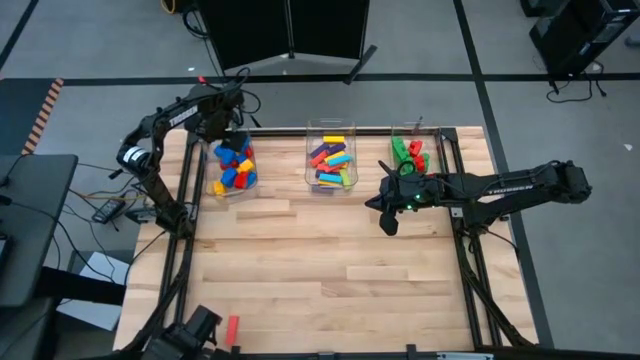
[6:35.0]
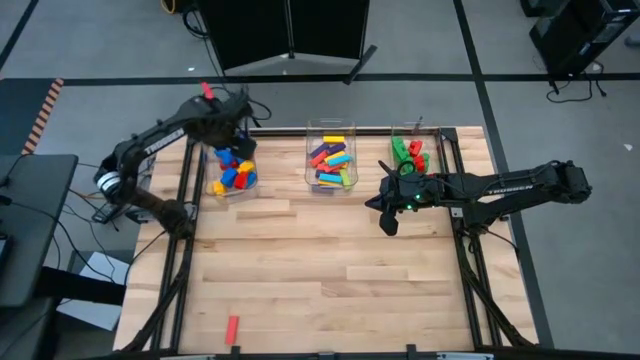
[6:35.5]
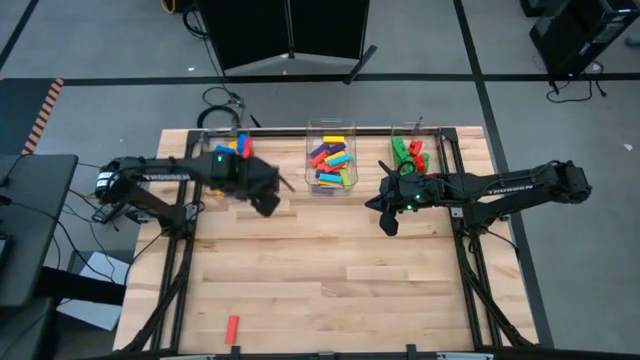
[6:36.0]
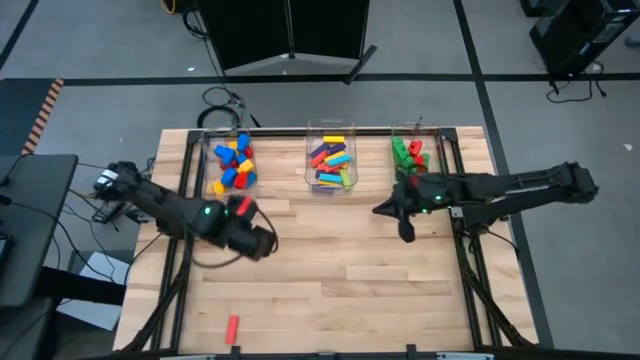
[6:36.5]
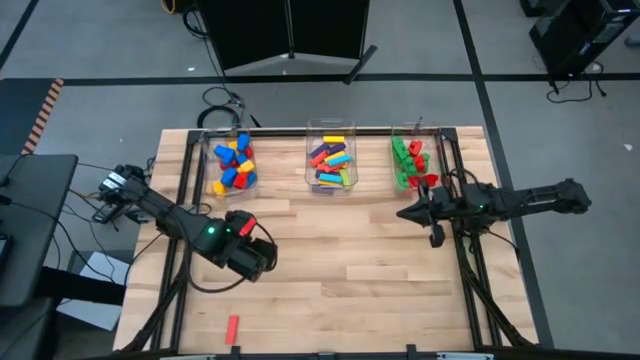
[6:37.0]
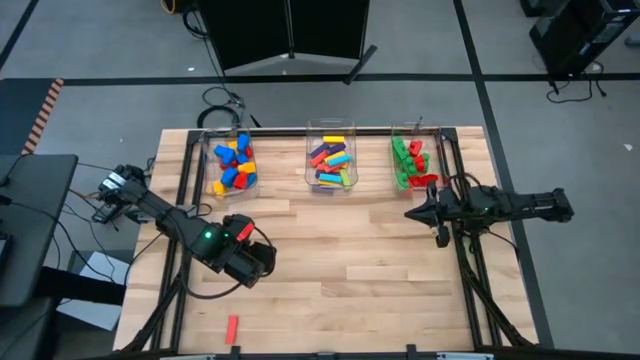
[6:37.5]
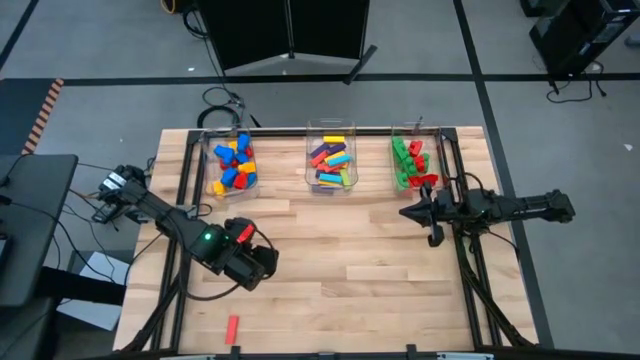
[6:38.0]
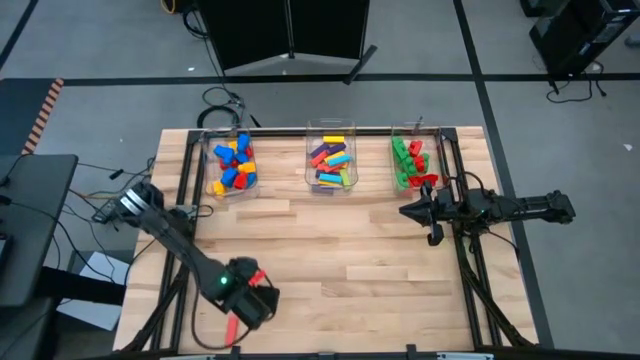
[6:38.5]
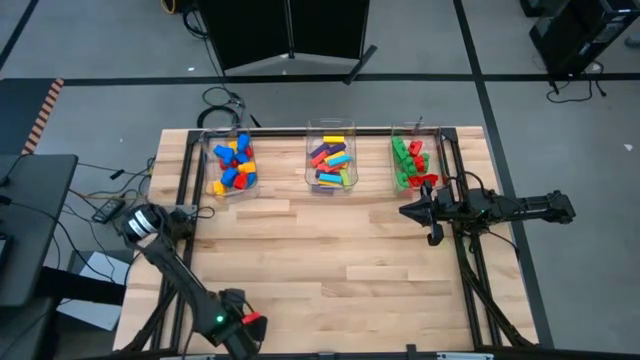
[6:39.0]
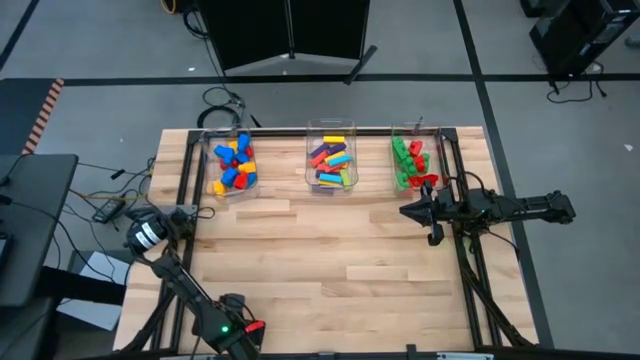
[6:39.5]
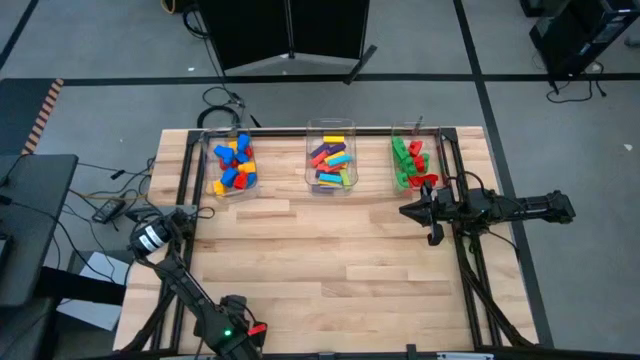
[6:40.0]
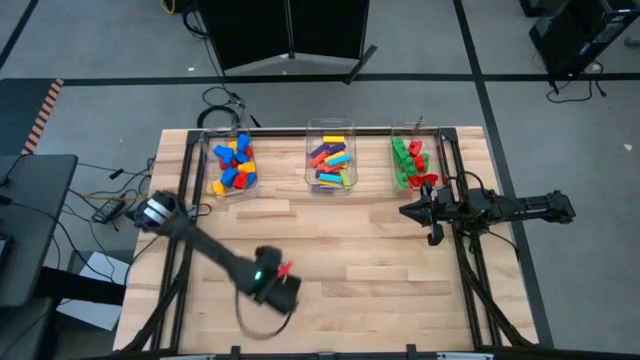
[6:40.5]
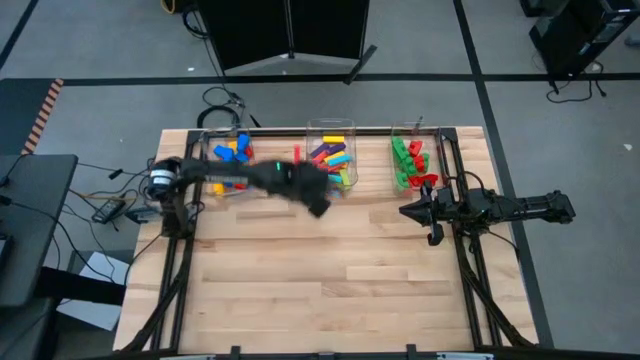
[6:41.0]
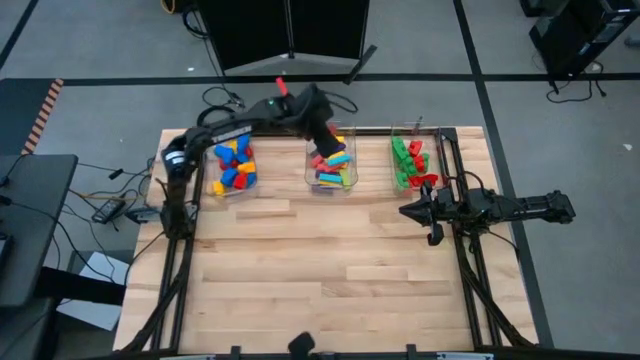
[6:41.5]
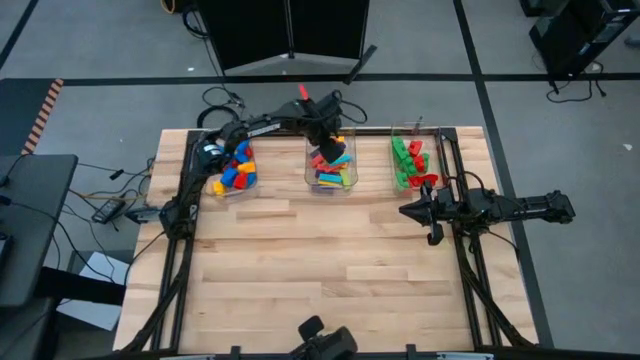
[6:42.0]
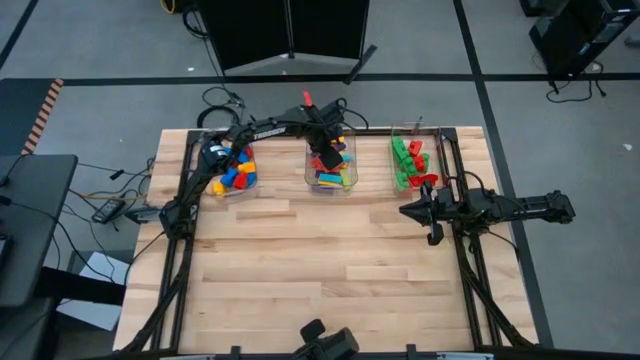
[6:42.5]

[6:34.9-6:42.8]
Task: Sort blocks by size
Put the red block into the middle transparent bin

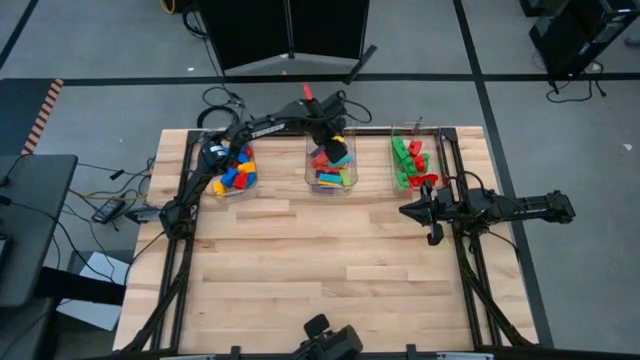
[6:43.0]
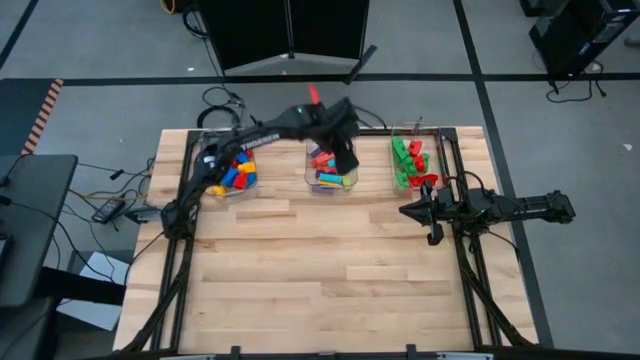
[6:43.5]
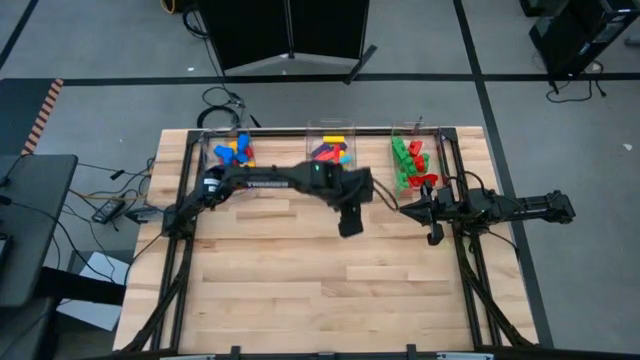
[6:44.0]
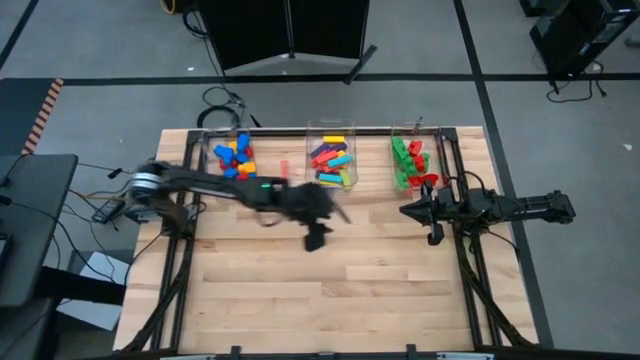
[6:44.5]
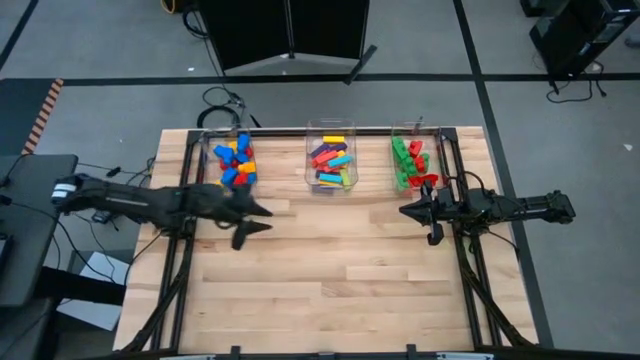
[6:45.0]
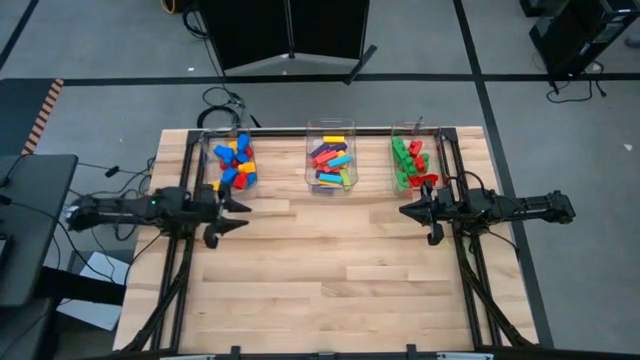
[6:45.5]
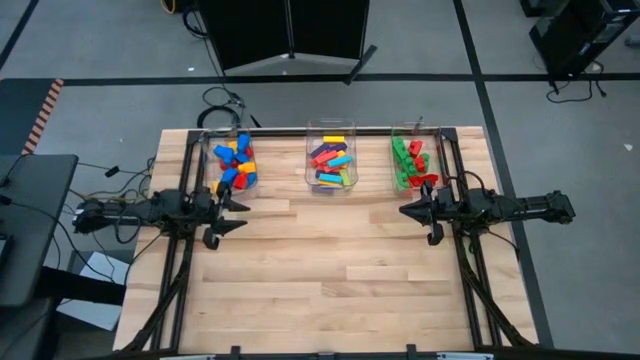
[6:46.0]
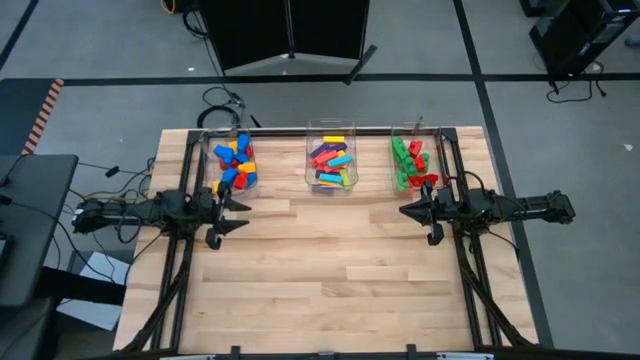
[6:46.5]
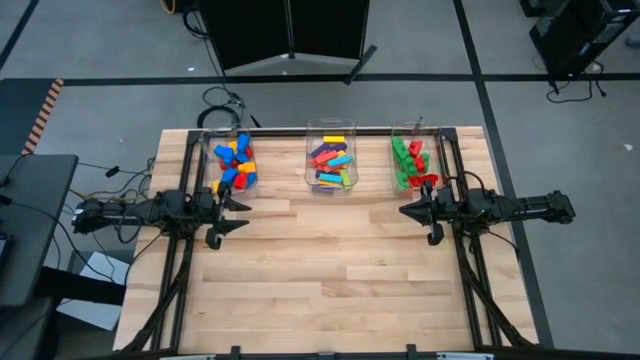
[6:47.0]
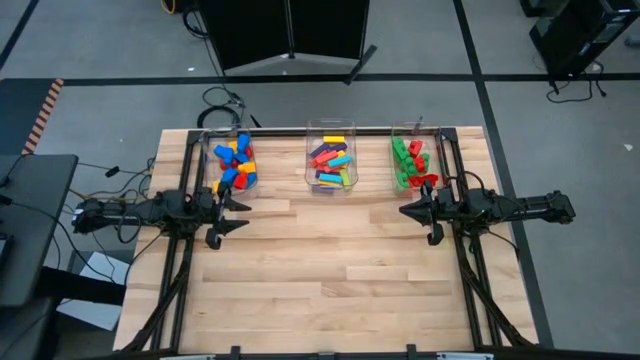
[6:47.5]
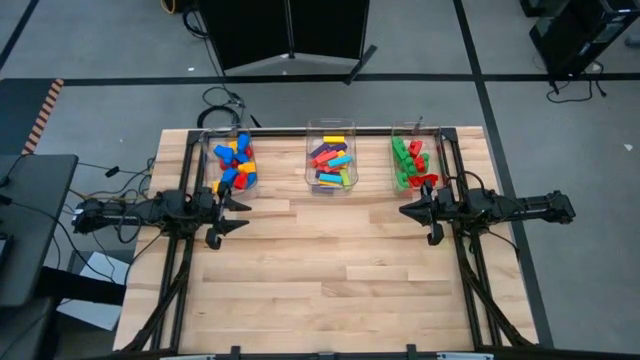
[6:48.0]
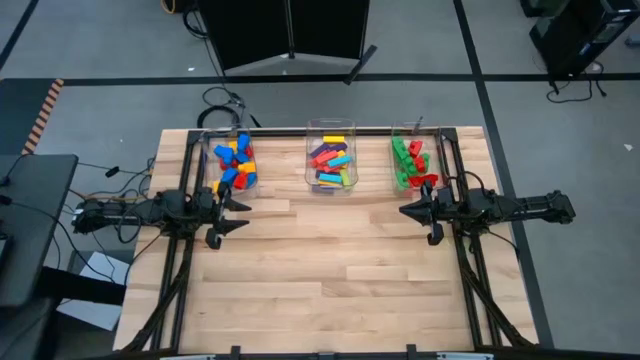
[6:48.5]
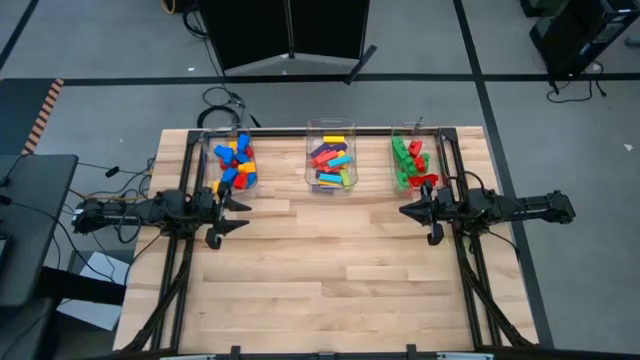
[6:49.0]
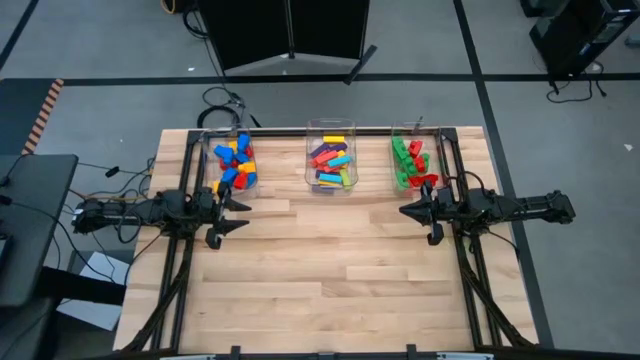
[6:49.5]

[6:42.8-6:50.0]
Return to Home Position

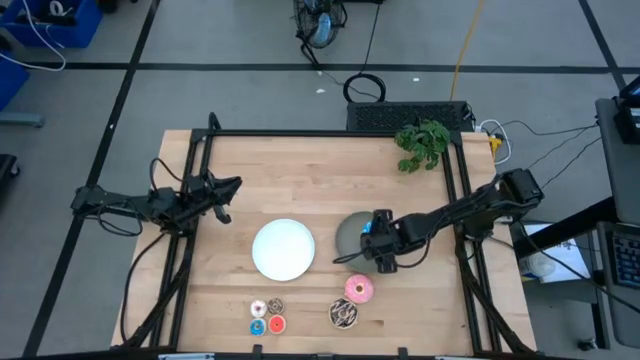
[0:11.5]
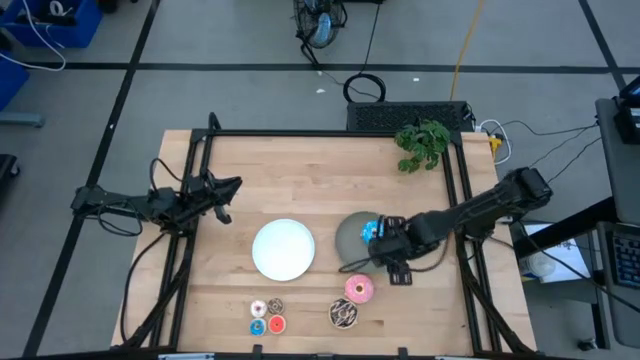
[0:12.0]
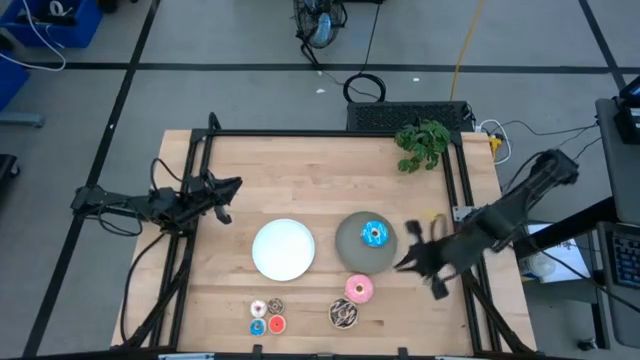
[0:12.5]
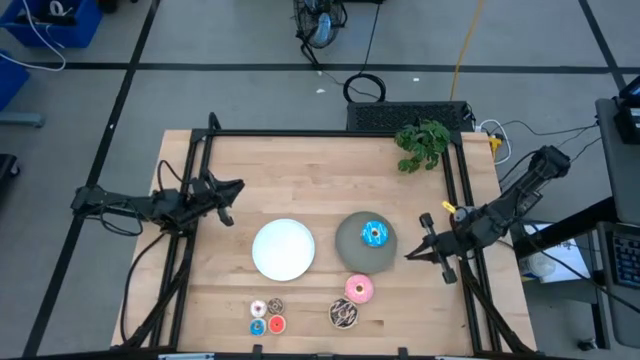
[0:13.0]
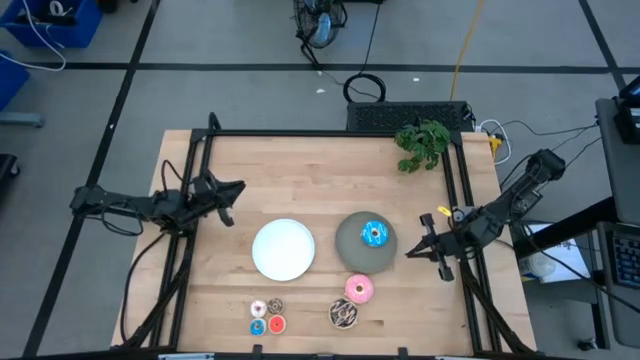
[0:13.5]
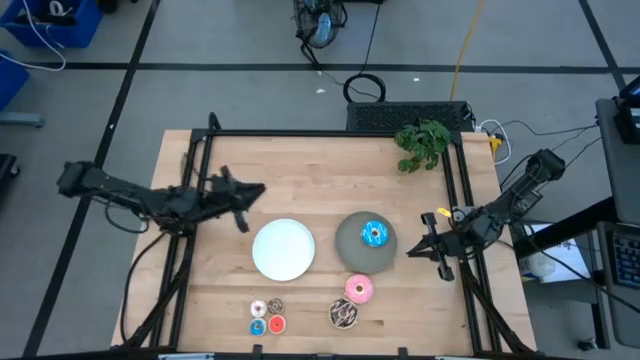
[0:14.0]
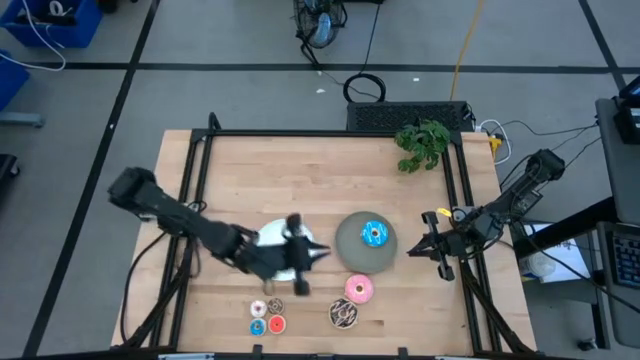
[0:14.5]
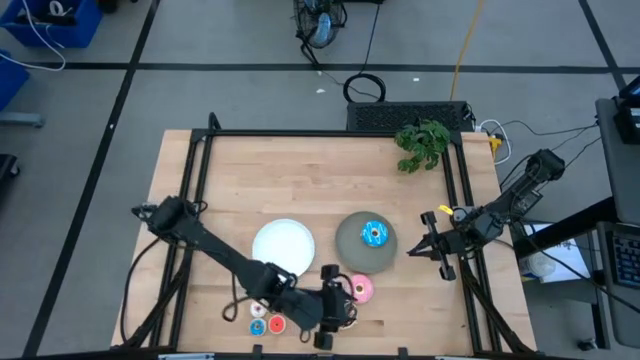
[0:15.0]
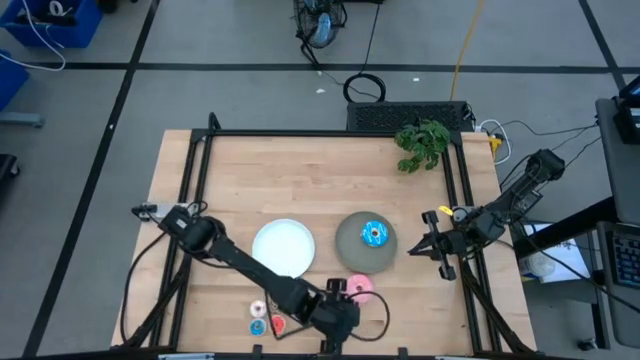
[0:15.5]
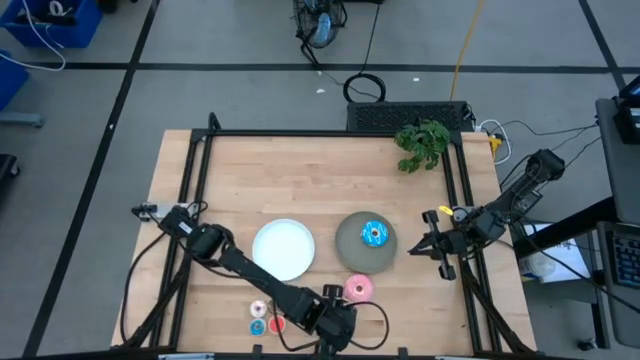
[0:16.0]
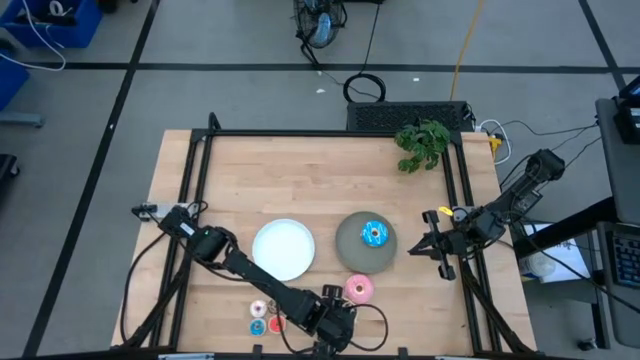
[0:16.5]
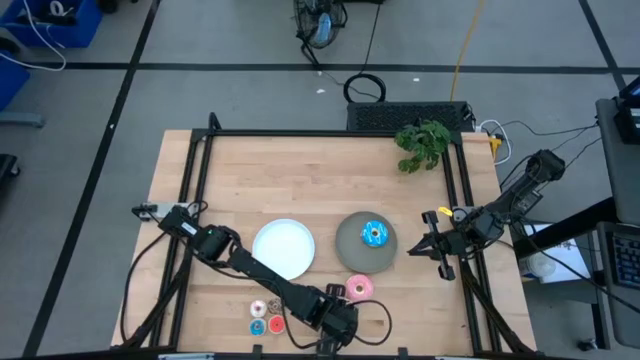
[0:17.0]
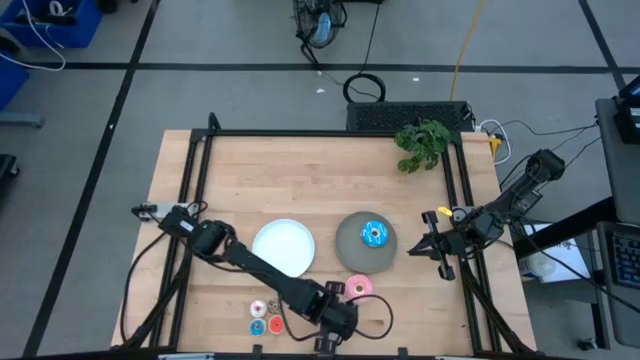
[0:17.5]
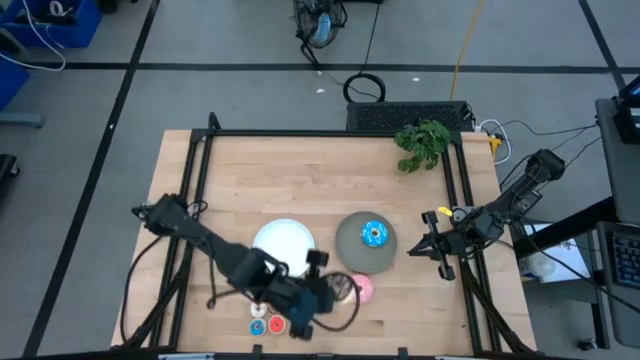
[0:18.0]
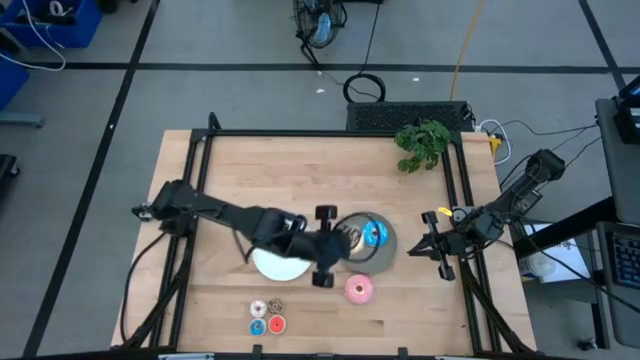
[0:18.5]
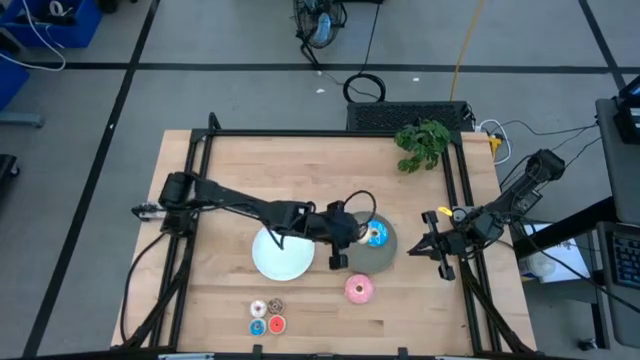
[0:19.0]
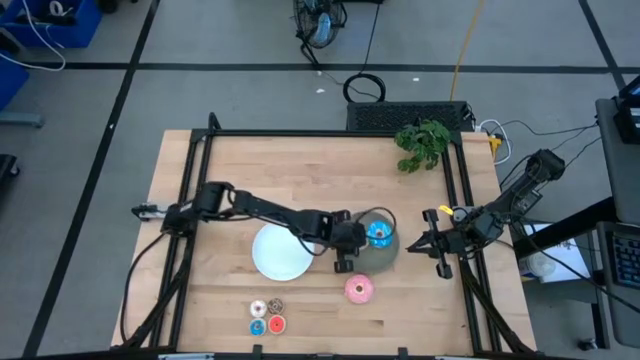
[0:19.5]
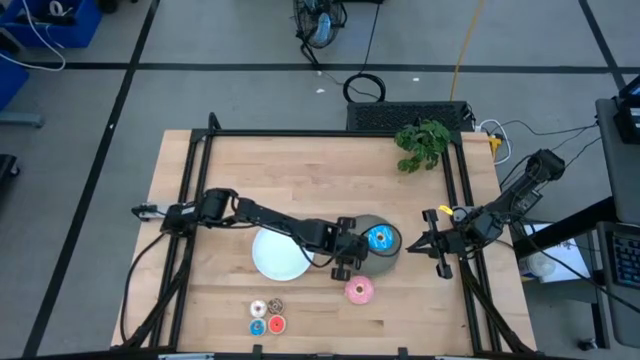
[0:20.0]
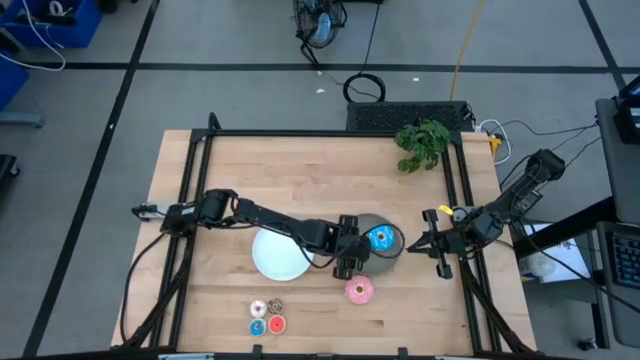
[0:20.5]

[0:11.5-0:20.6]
Task: Pick & Place donuts
Put the large black donut on the gray plate
